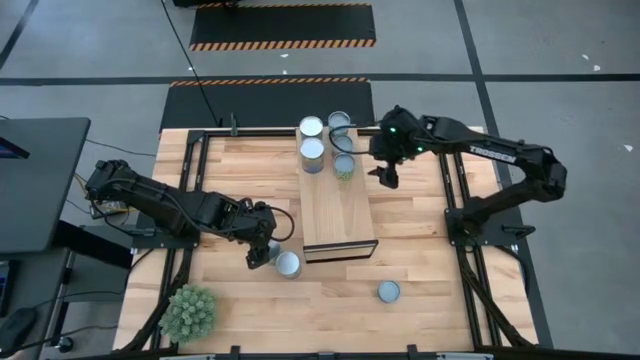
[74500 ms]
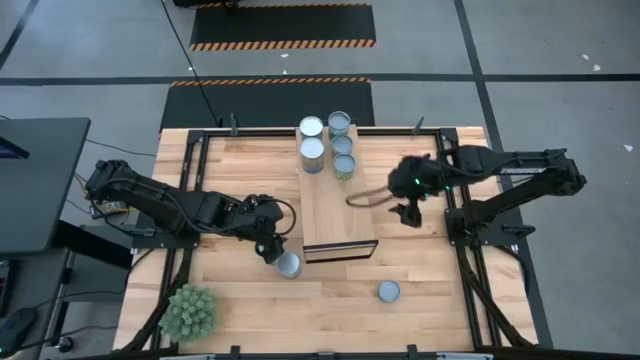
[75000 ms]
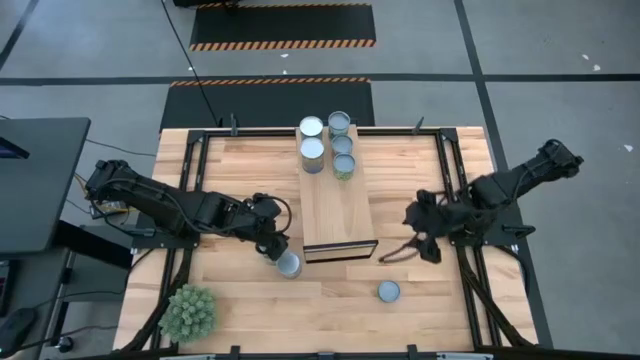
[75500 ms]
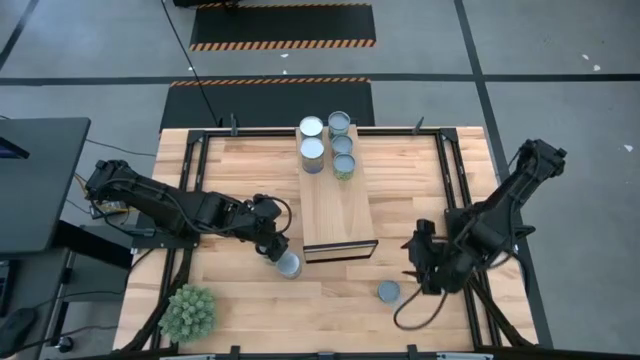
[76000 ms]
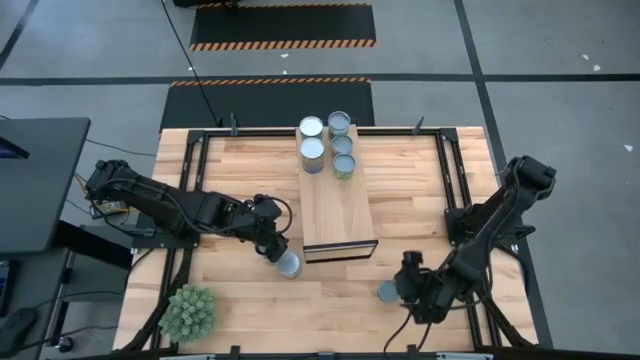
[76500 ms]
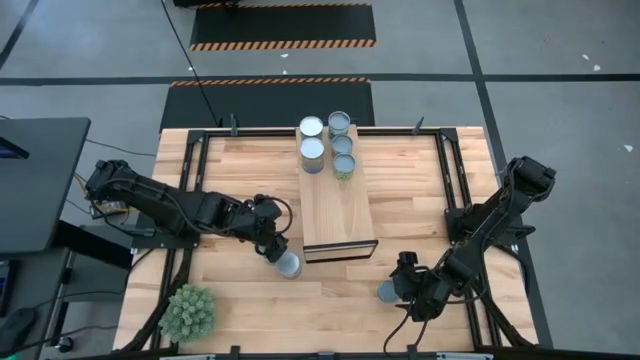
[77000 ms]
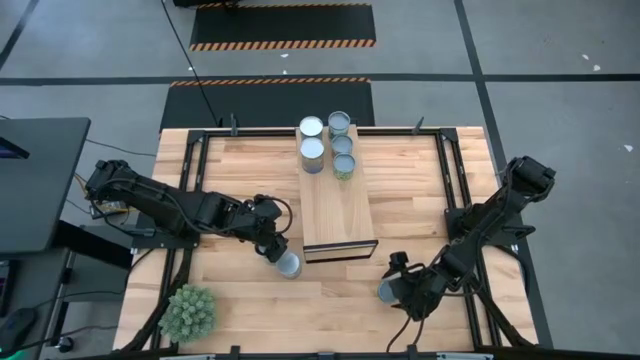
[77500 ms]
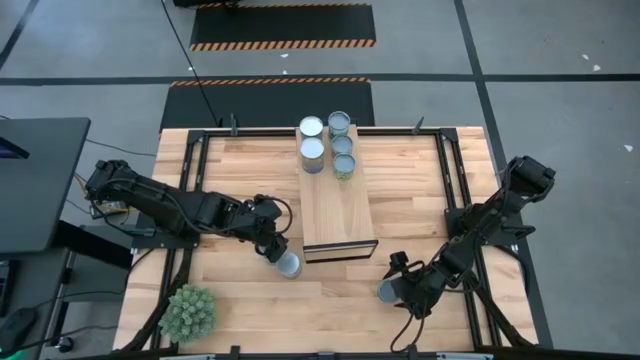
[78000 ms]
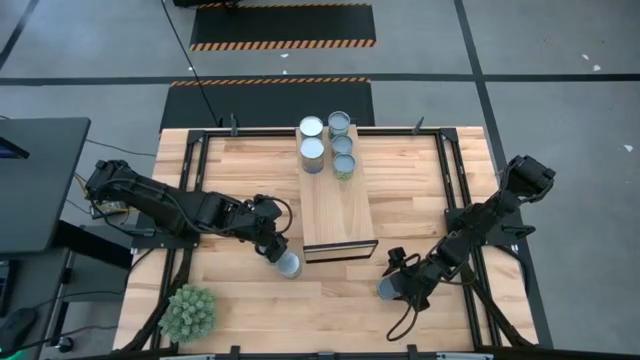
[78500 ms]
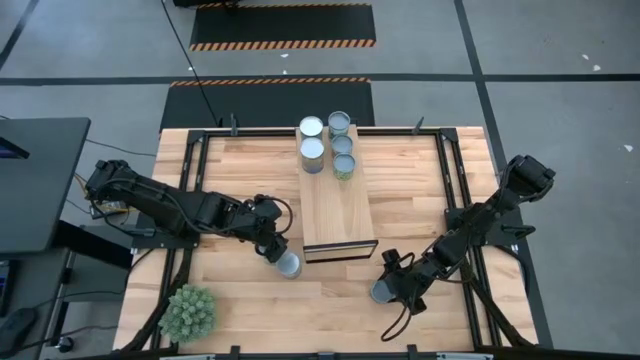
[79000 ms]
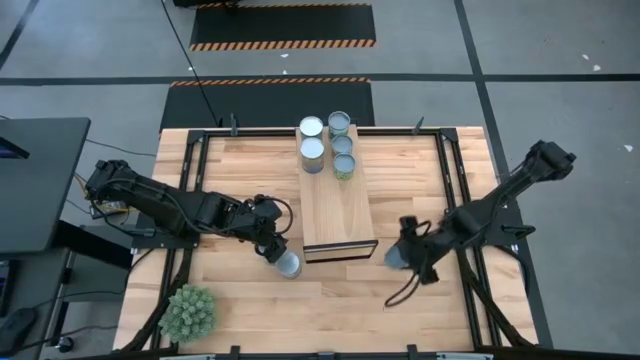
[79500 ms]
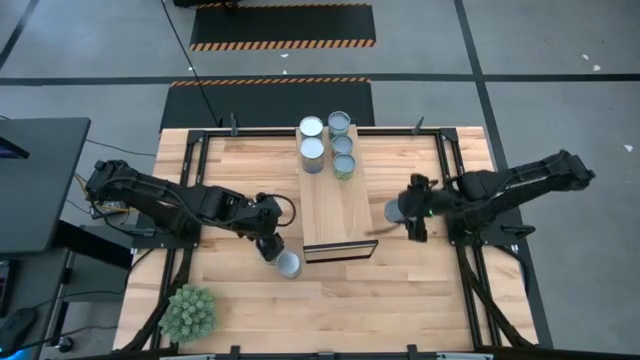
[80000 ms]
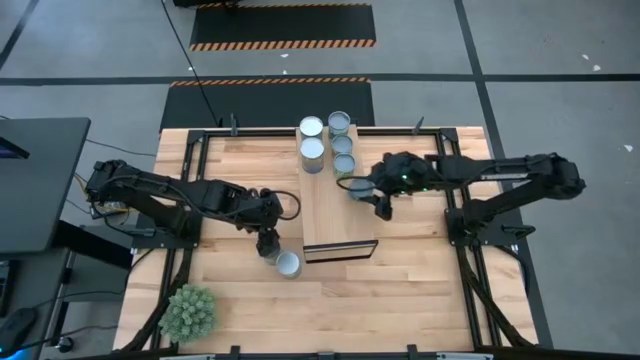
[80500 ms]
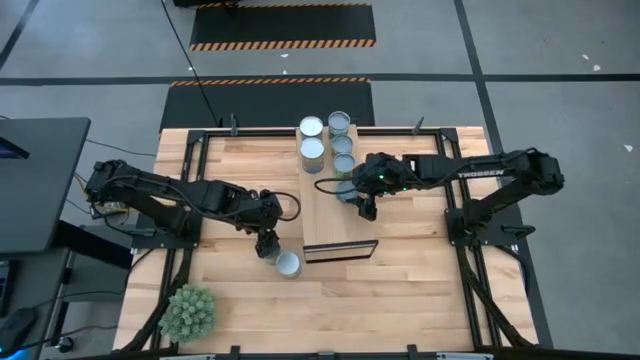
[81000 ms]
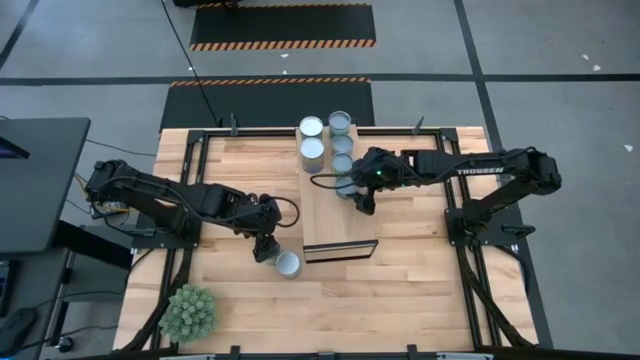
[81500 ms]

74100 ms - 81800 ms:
Task: Pick and place cans onto a shelf
Put the canned tuna on the shelf

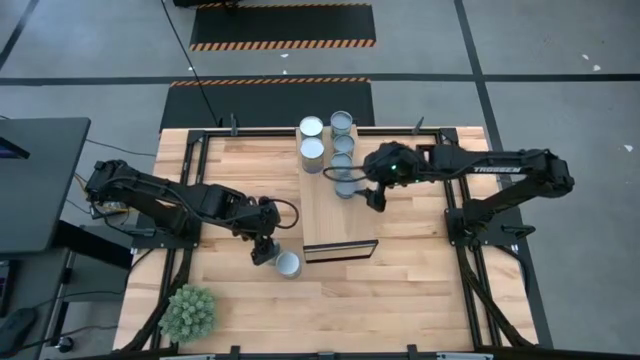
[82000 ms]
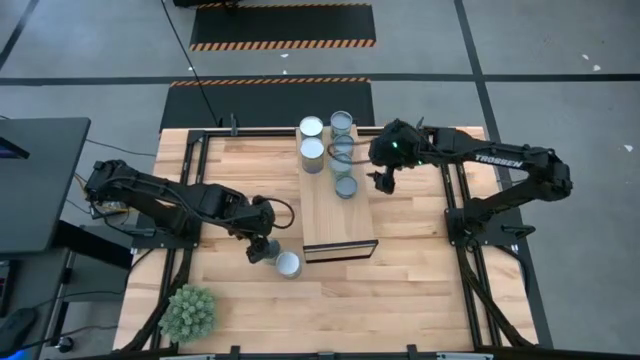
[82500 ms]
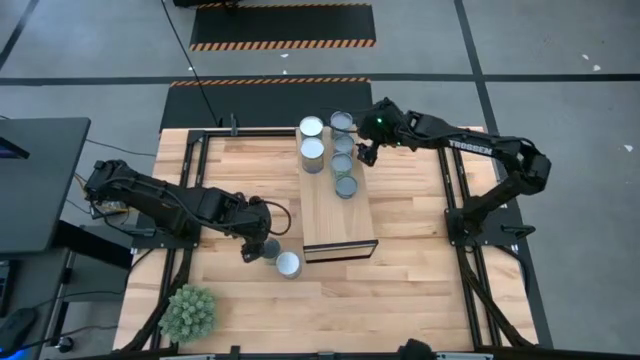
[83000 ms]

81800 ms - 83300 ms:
Adjust the canned diced tomatoes on the shelf

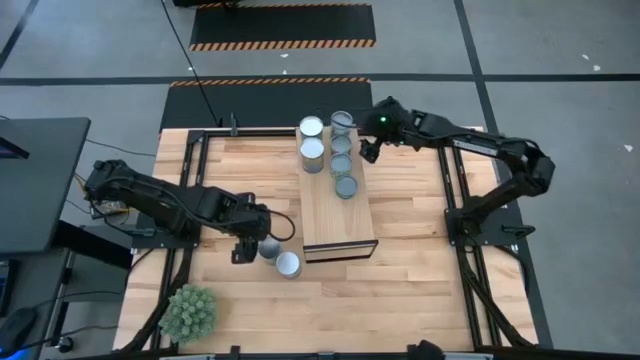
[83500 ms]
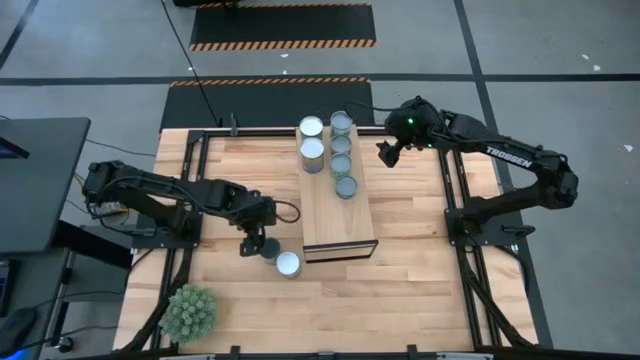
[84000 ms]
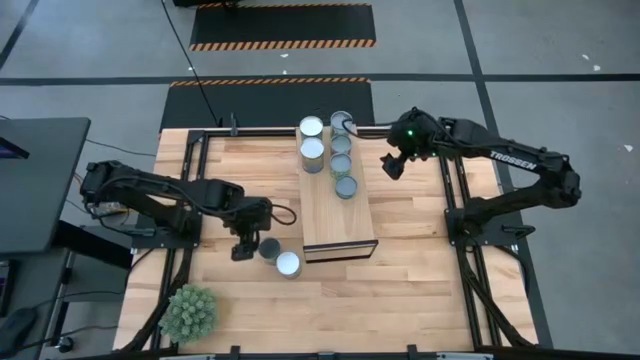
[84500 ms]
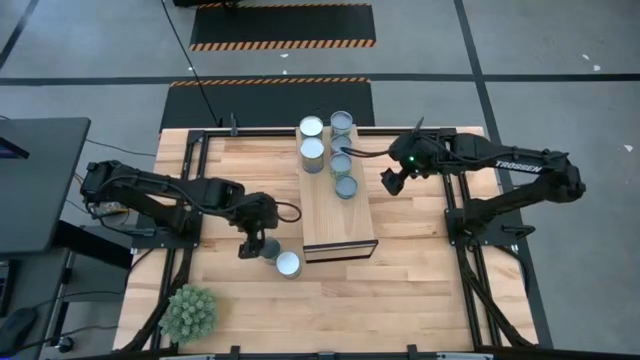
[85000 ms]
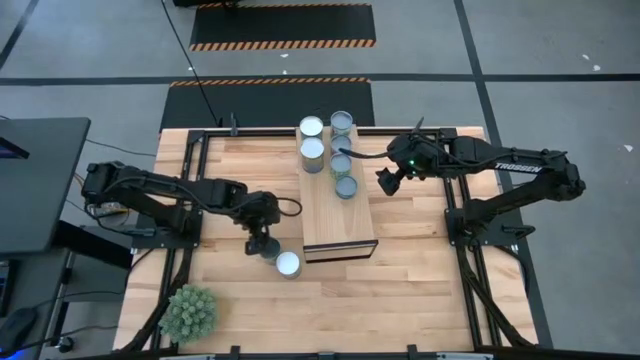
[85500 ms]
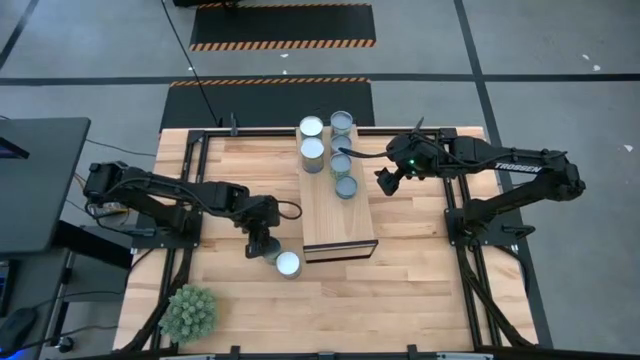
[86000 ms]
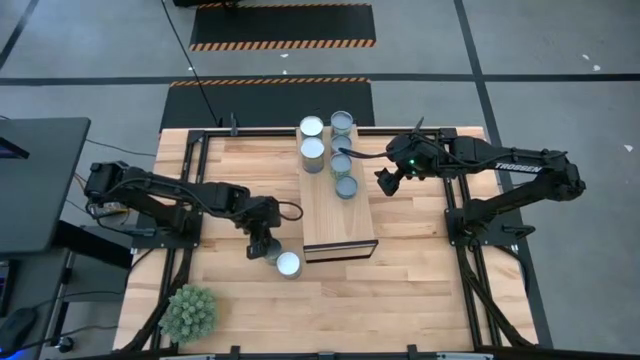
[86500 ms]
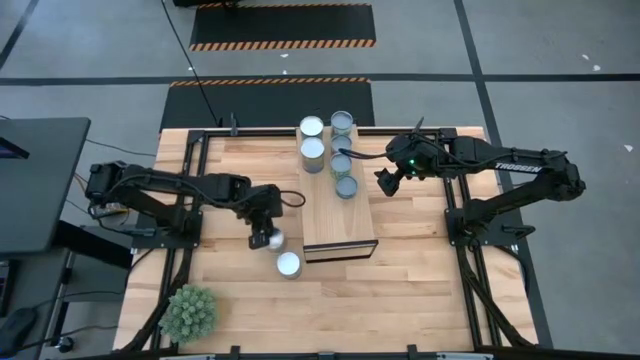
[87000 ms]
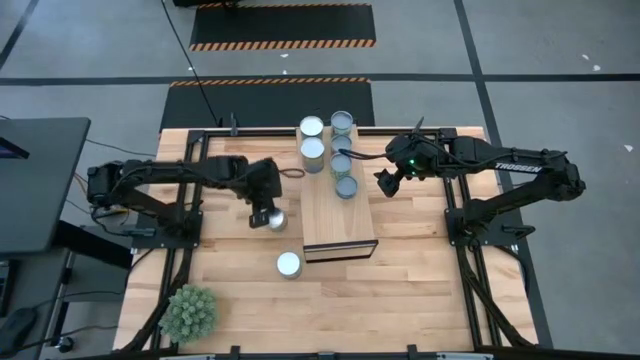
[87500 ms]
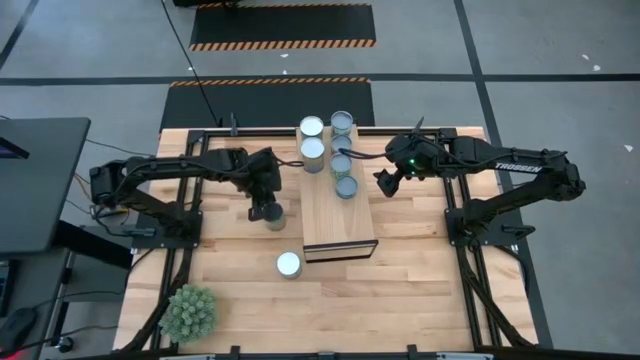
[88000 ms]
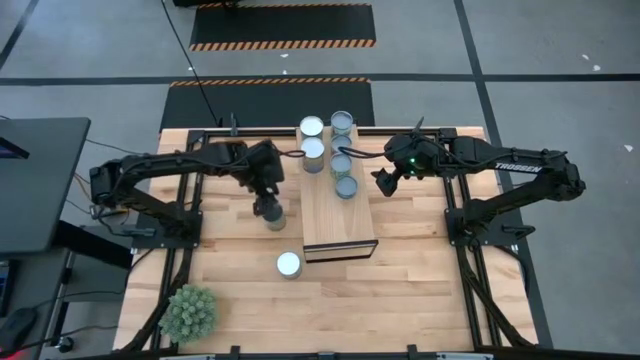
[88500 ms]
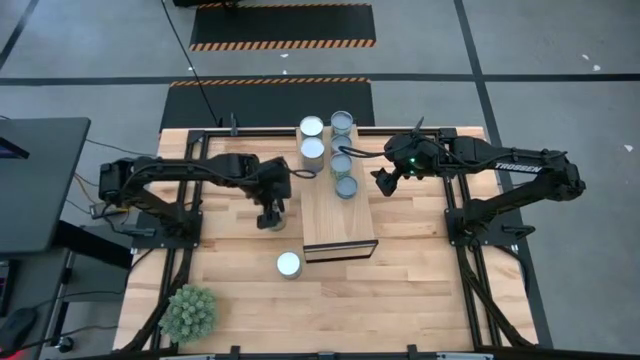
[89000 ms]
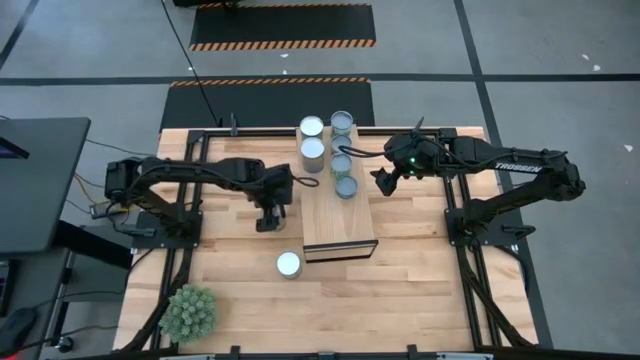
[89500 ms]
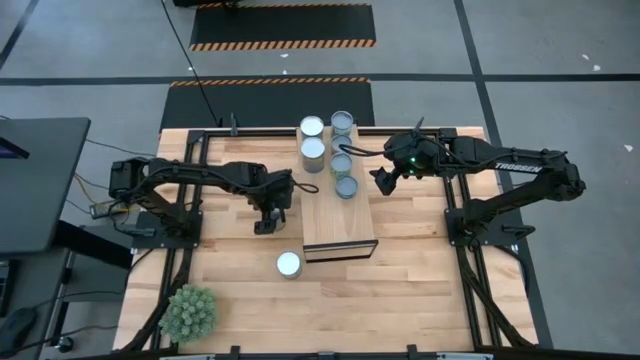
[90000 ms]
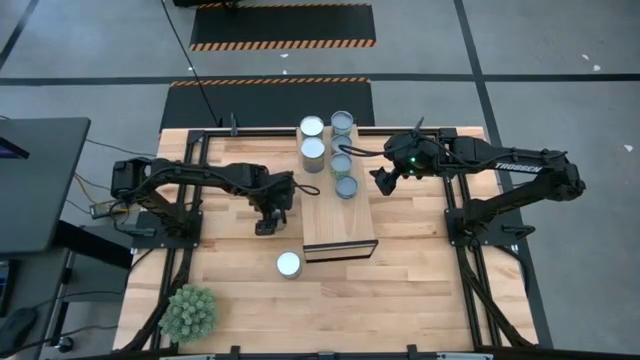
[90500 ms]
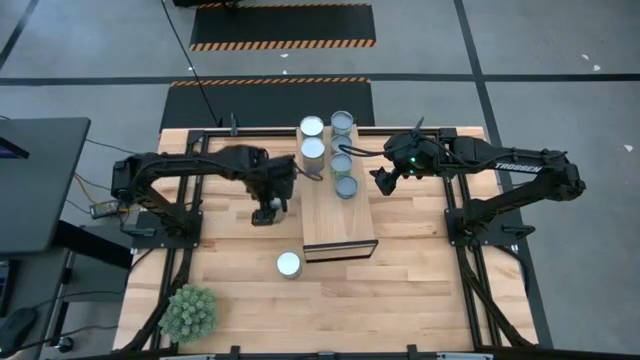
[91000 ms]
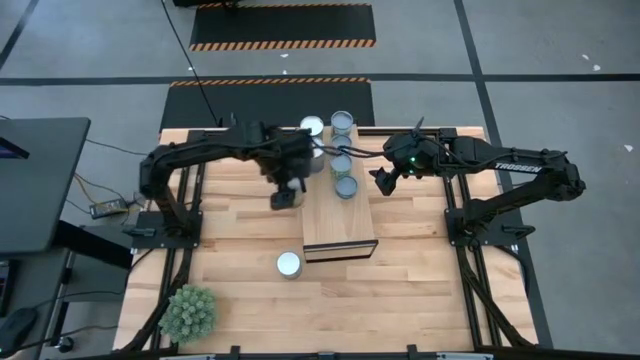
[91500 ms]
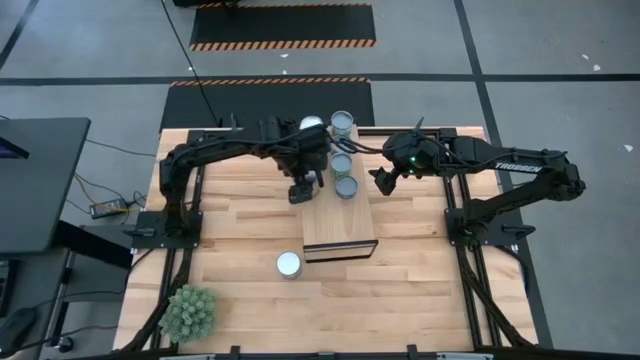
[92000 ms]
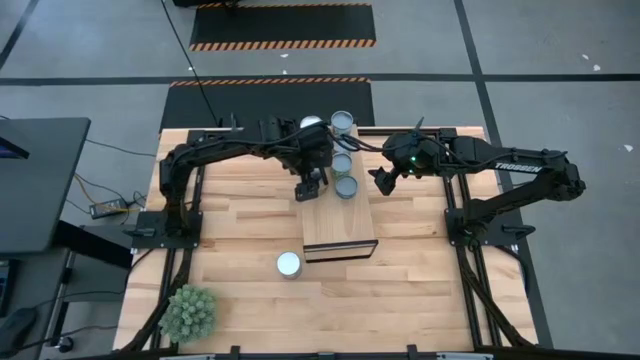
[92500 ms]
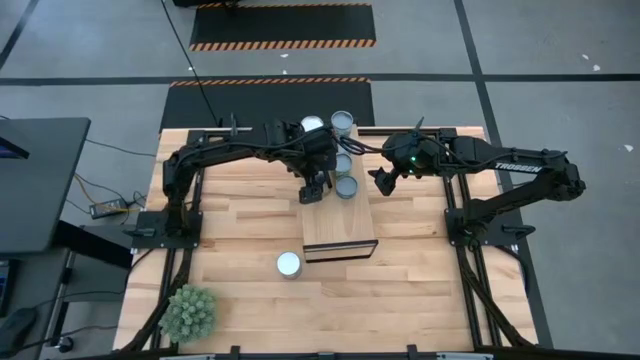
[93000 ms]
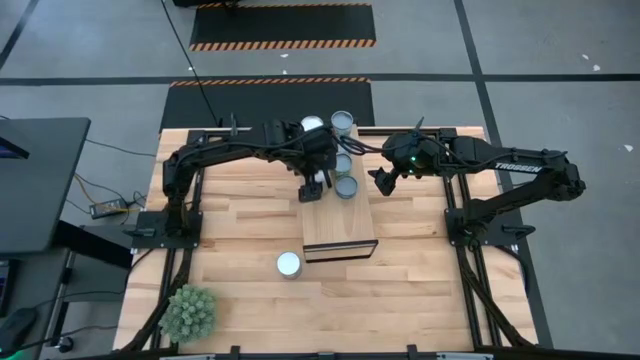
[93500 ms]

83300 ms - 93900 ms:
Put the canned oranges on the shelf
